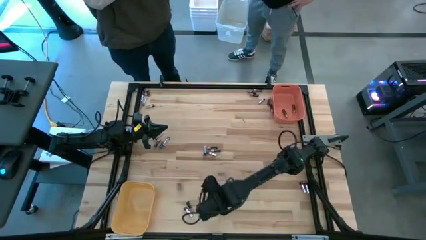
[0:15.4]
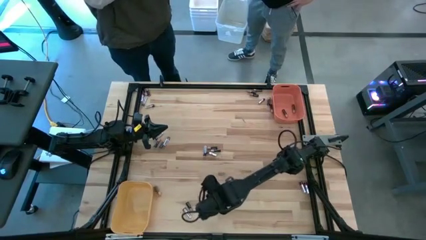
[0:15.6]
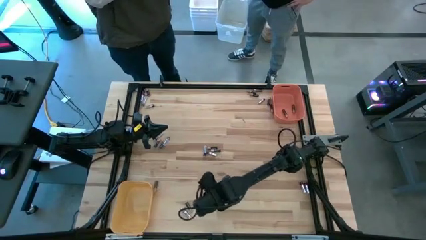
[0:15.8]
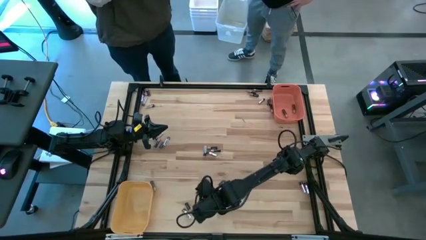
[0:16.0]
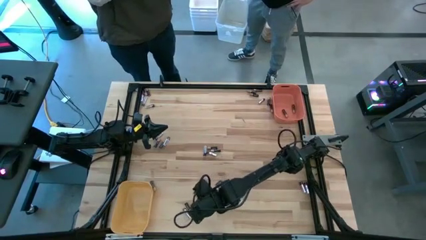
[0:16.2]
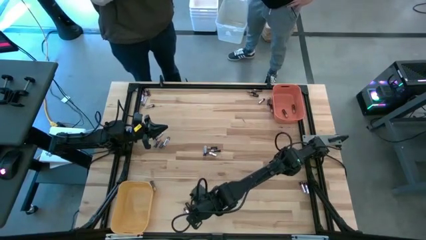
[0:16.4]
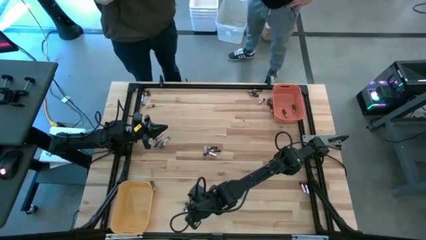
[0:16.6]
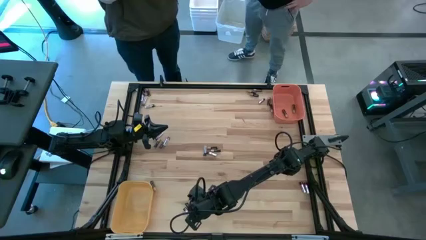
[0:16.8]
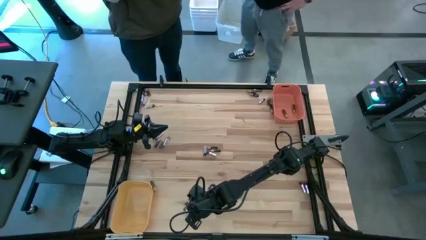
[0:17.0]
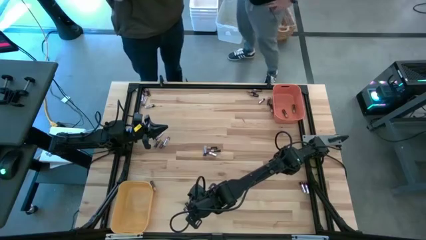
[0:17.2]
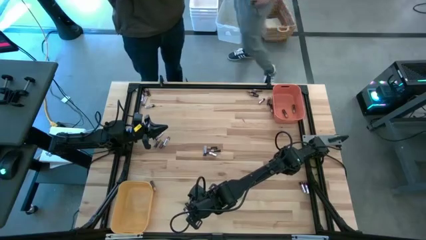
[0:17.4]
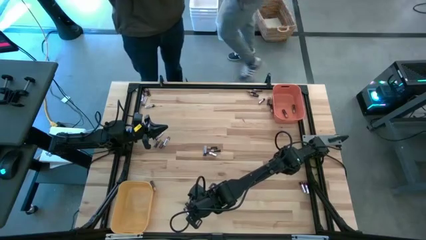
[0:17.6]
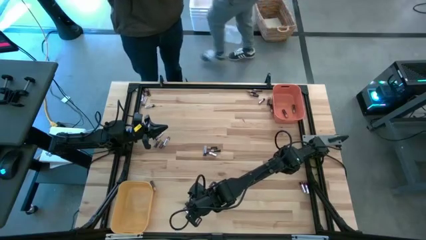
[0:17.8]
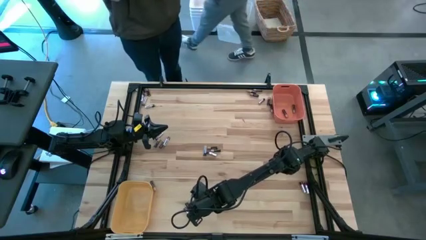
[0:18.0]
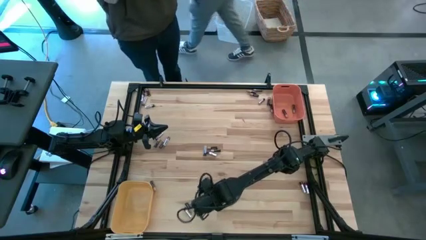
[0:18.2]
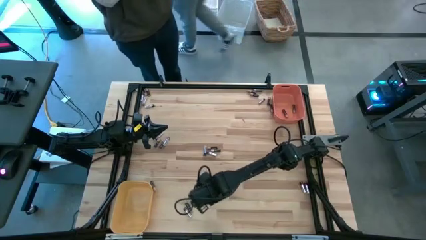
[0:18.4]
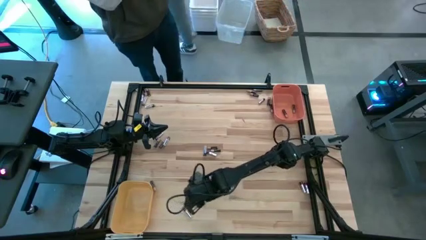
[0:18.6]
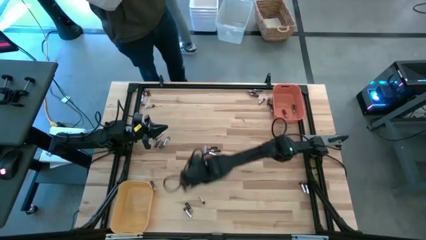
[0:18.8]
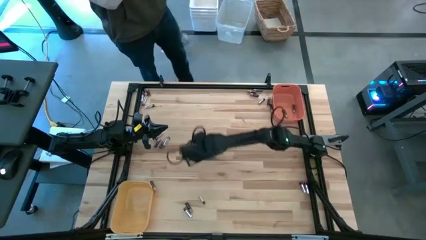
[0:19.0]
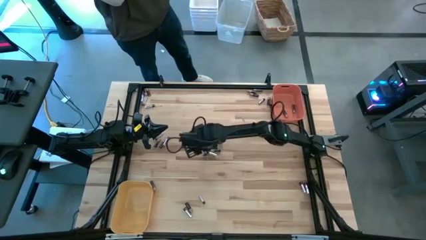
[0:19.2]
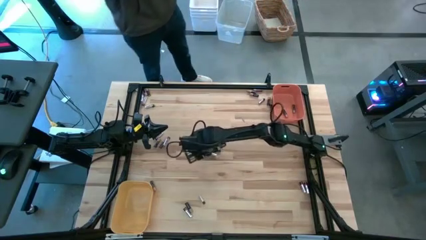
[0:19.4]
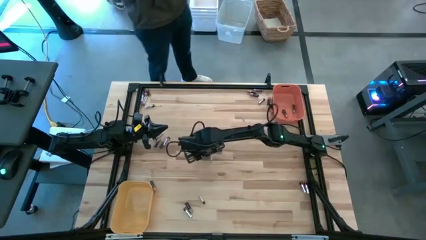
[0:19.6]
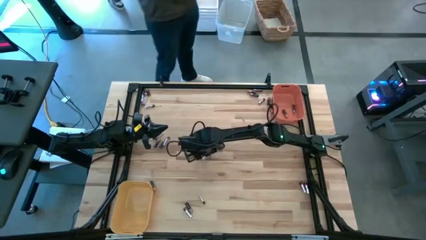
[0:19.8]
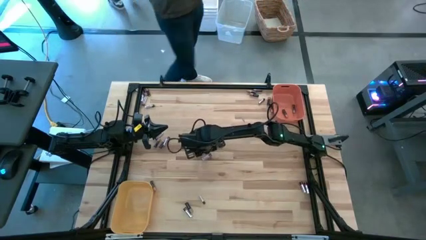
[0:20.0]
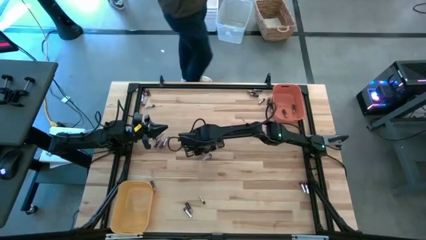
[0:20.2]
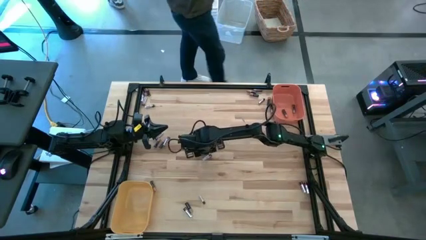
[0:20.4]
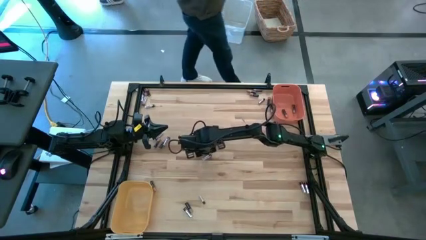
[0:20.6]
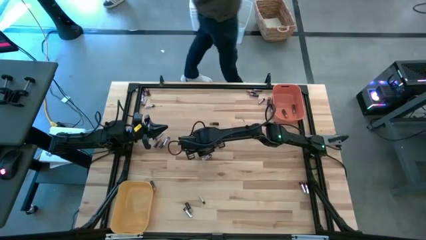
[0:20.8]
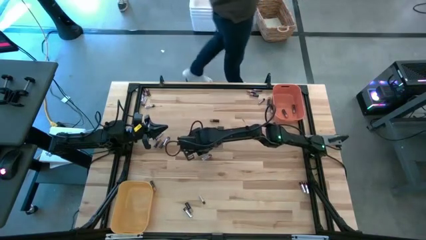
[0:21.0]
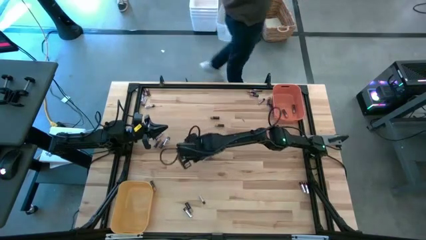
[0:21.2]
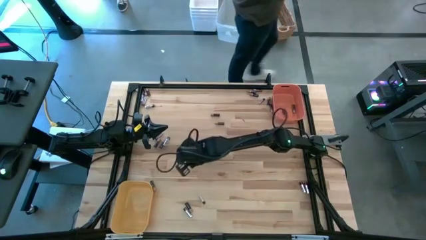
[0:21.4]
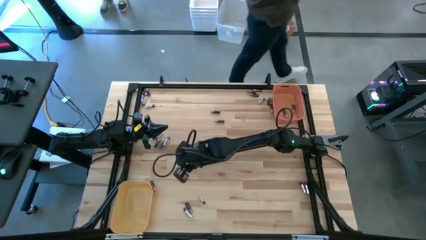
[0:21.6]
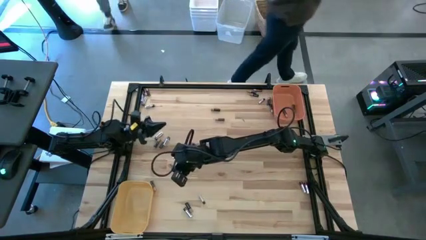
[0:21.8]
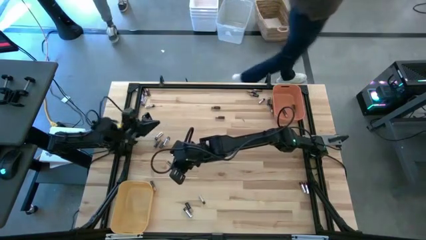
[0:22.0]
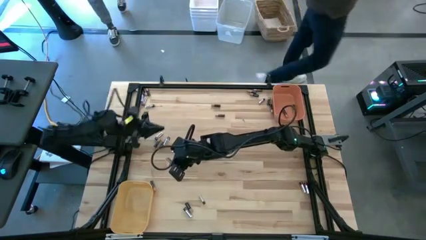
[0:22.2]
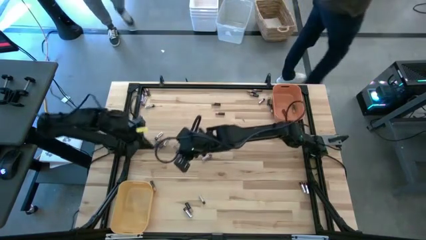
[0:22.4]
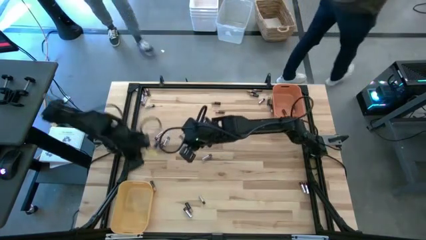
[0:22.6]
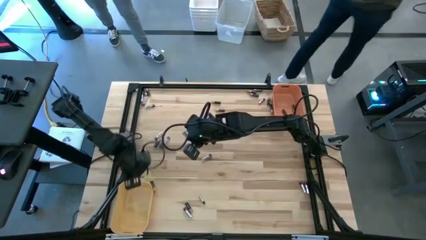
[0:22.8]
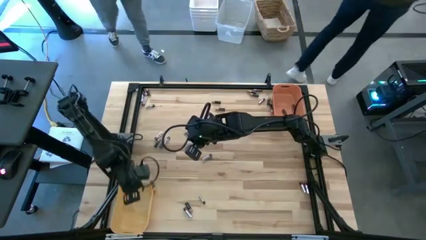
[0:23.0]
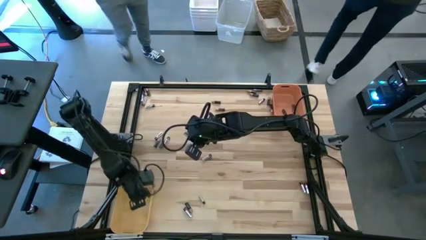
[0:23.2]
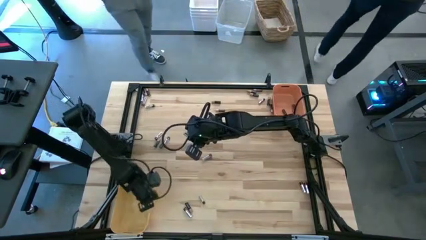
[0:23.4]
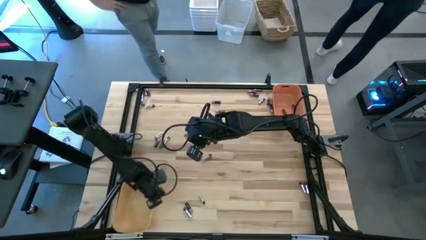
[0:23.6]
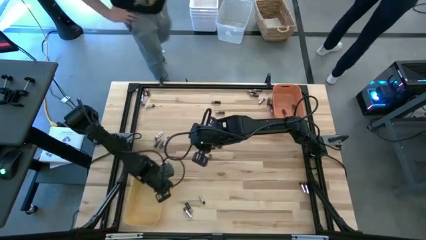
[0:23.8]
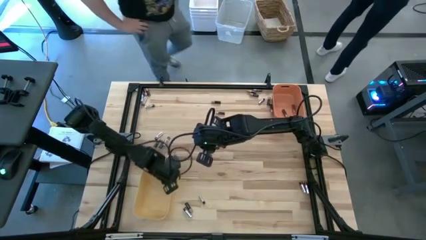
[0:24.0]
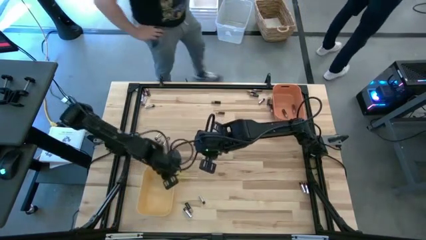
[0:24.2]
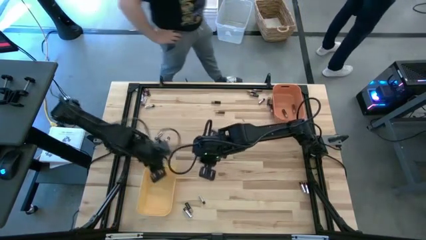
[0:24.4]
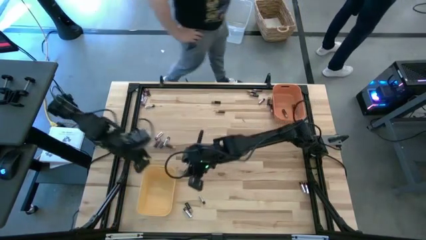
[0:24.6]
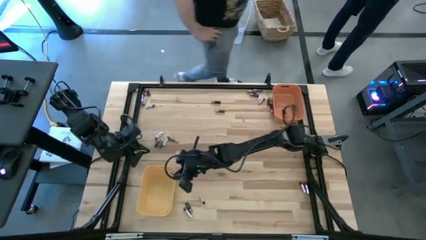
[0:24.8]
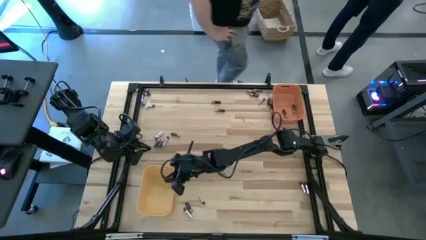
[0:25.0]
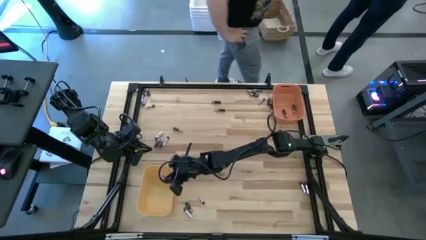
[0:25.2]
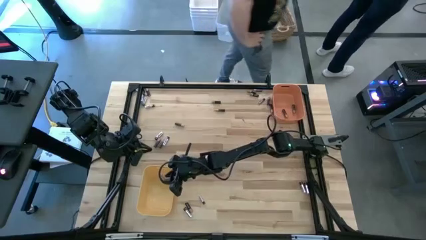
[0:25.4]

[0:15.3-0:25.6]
Task: Sort batteries
Put the silver battery into the yellow bin

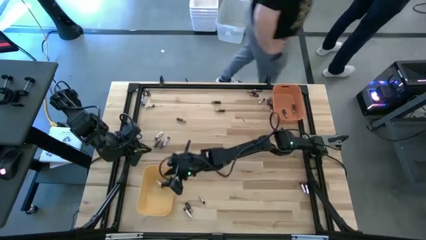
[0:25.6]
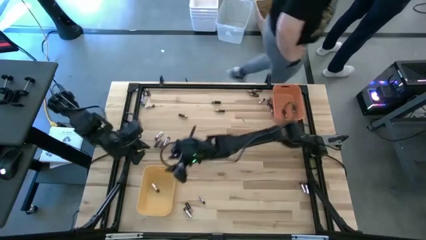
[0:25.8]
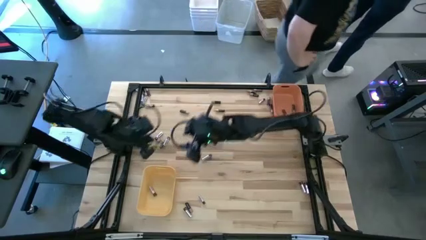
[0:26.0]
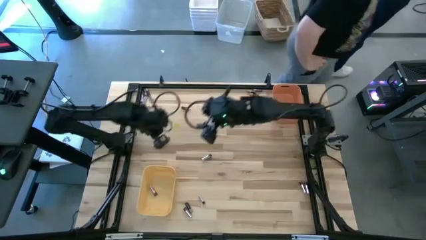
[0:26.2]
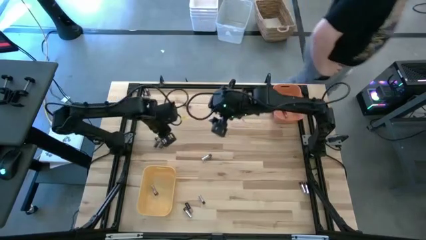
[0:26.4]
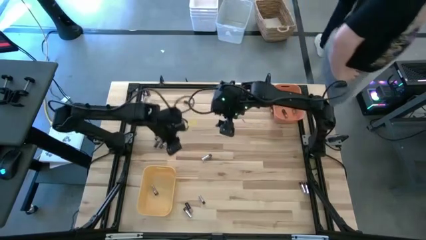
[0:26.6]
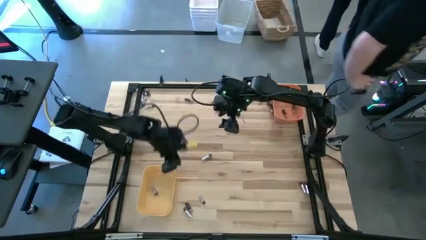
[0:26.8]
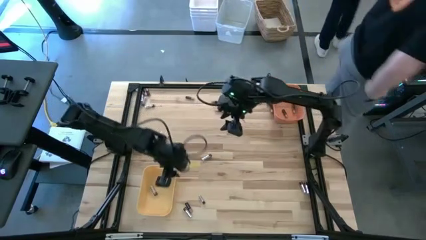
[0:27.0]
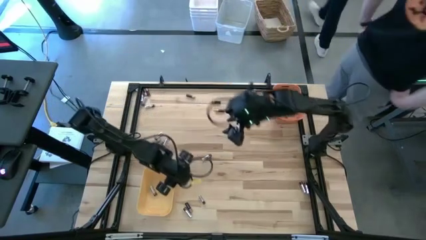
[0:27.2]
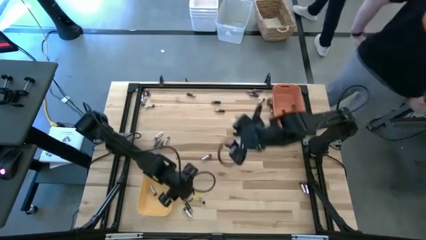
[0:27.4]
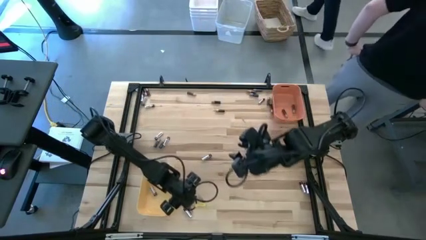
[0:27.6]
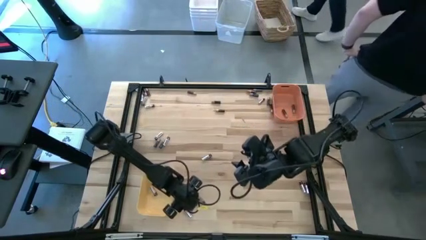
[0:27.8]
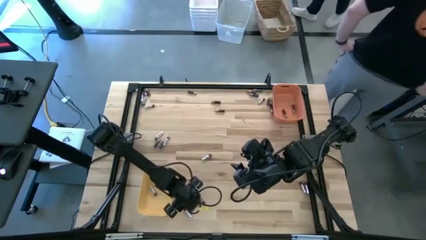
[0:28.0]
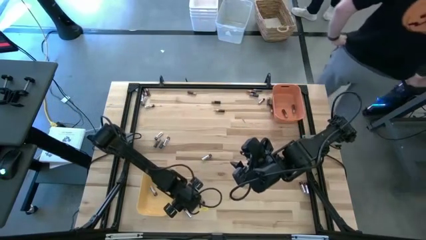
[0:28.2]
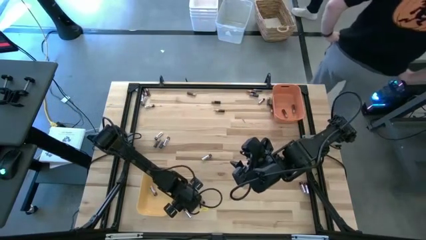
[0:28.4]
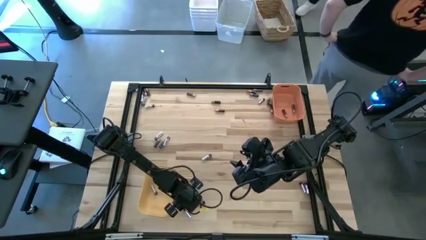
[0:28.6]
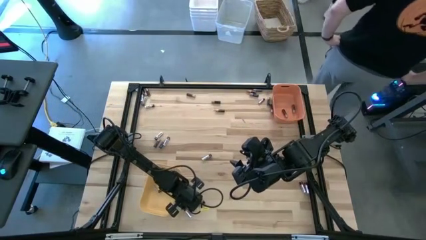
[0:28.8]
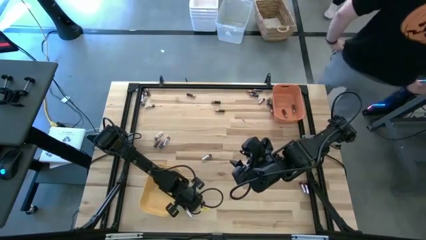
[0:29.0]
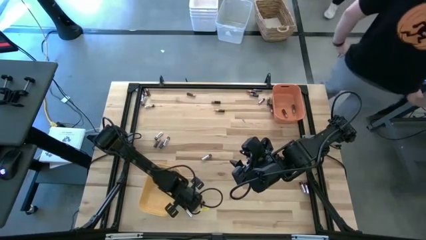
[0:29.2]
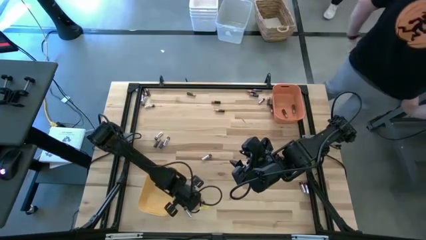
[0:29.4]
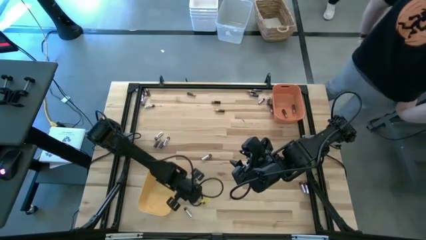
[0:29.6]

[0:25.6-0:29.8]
Put the black battery into the orange bin
